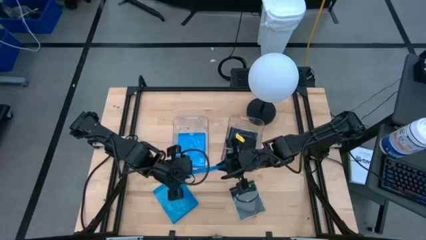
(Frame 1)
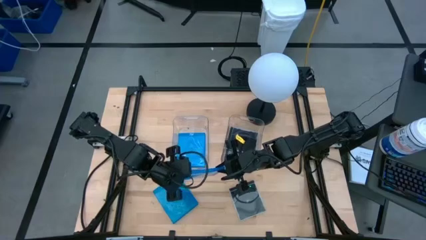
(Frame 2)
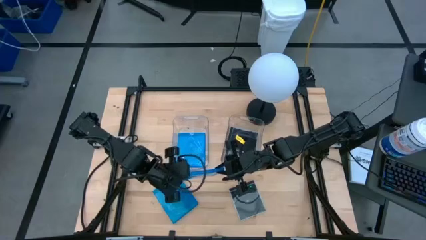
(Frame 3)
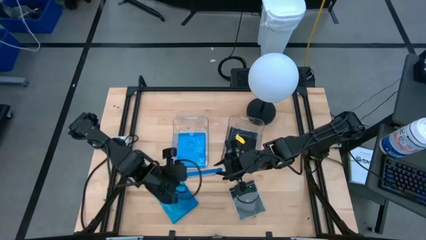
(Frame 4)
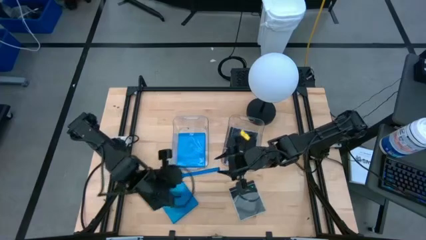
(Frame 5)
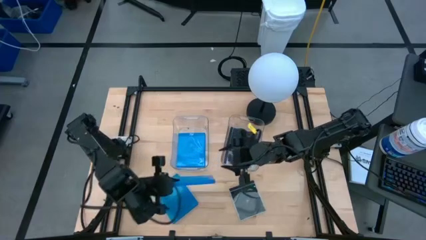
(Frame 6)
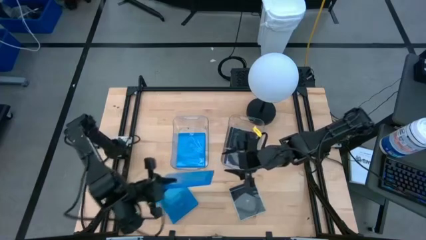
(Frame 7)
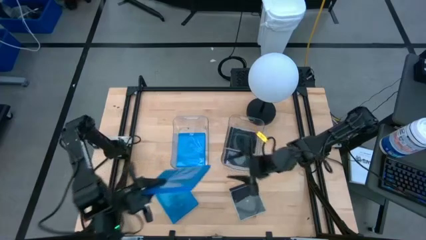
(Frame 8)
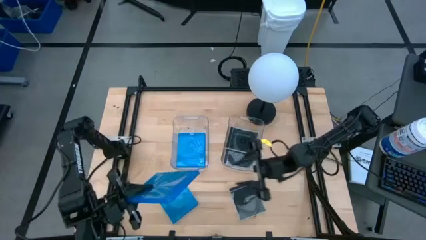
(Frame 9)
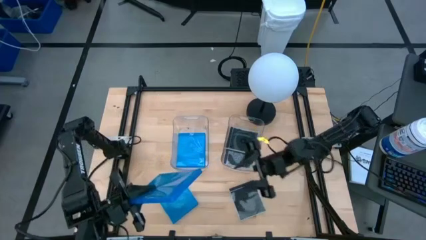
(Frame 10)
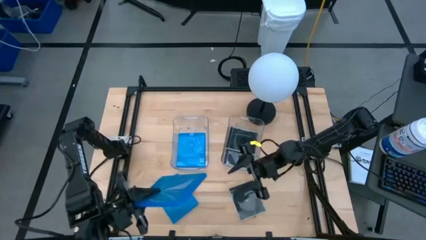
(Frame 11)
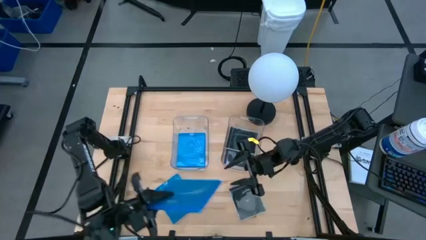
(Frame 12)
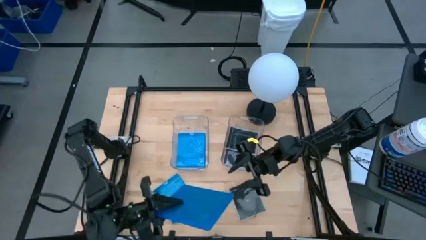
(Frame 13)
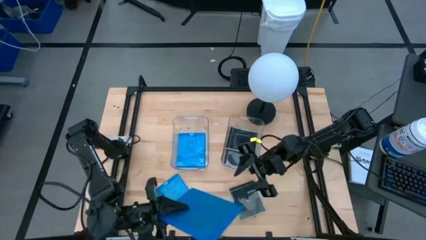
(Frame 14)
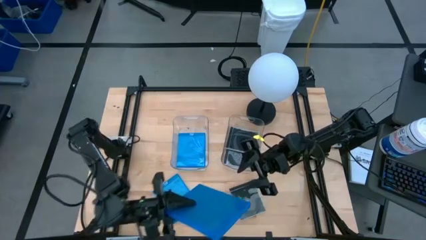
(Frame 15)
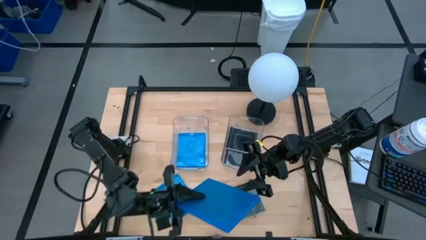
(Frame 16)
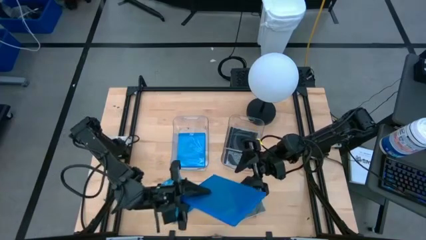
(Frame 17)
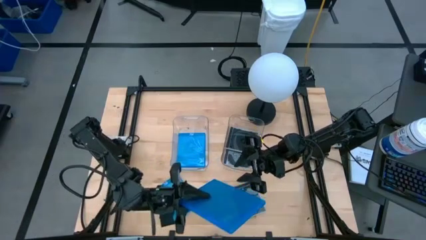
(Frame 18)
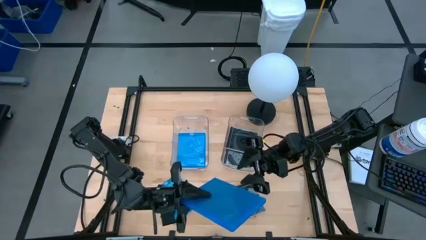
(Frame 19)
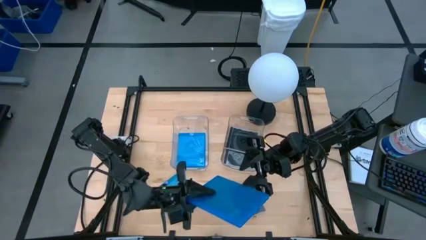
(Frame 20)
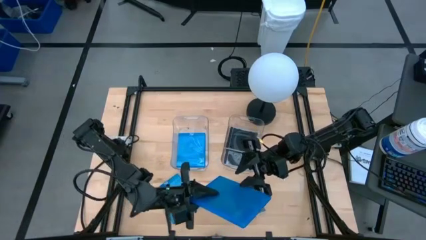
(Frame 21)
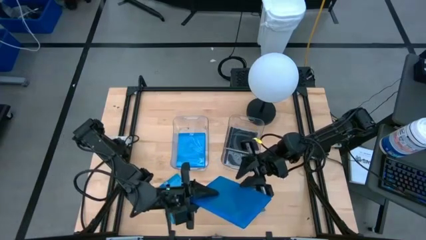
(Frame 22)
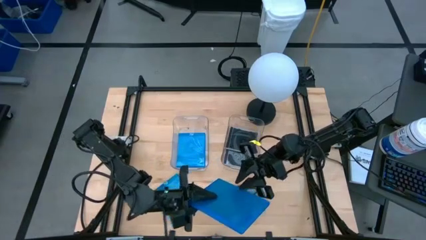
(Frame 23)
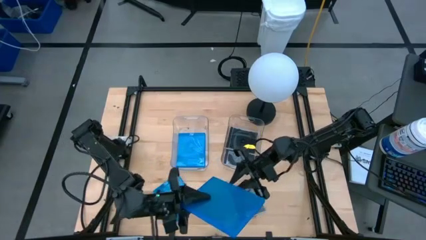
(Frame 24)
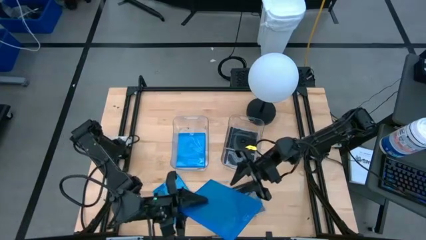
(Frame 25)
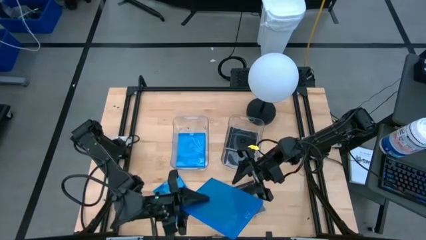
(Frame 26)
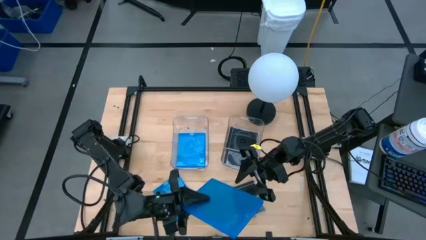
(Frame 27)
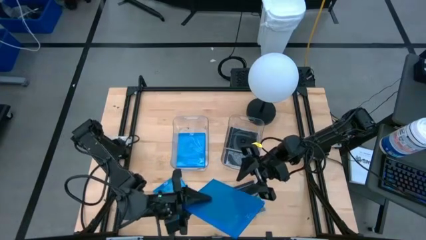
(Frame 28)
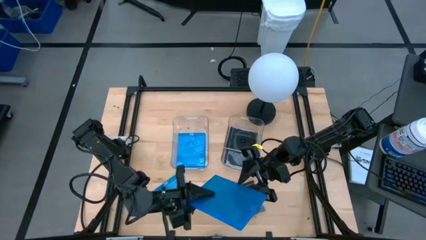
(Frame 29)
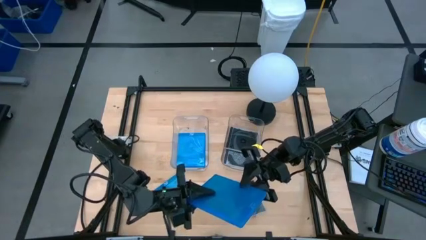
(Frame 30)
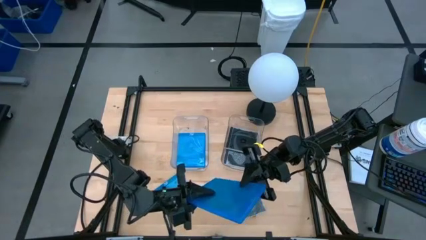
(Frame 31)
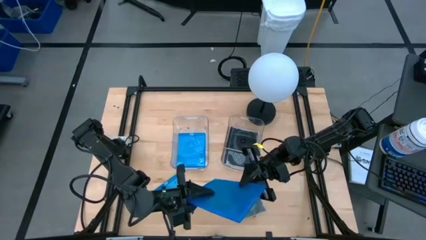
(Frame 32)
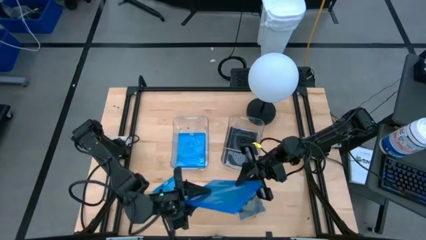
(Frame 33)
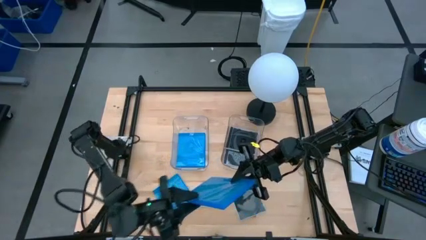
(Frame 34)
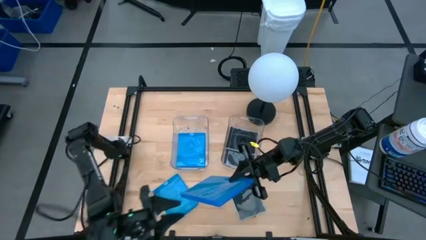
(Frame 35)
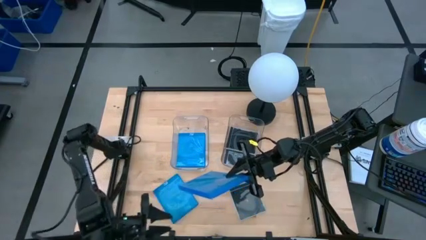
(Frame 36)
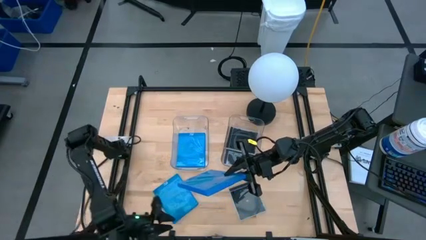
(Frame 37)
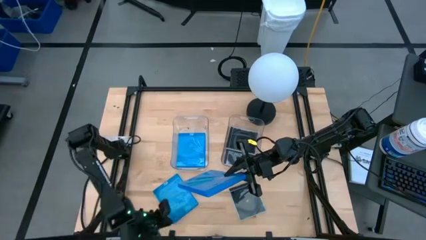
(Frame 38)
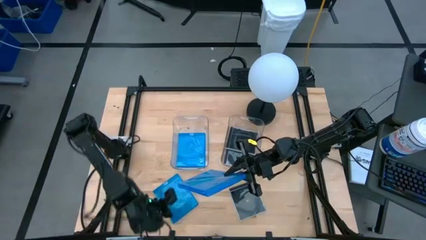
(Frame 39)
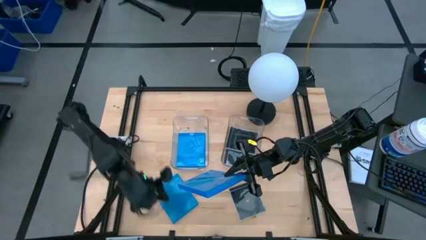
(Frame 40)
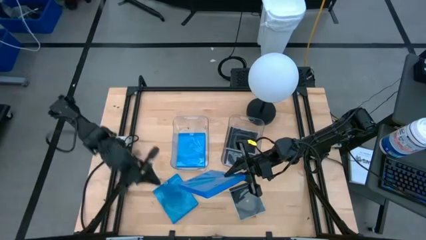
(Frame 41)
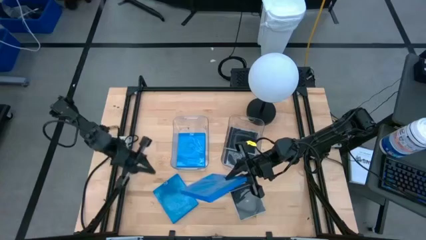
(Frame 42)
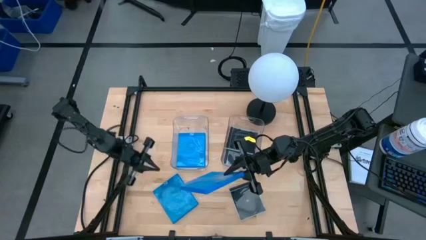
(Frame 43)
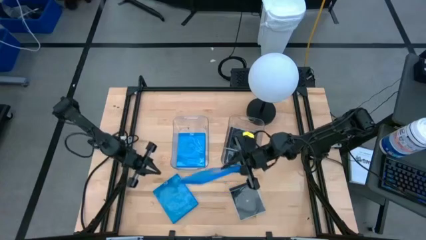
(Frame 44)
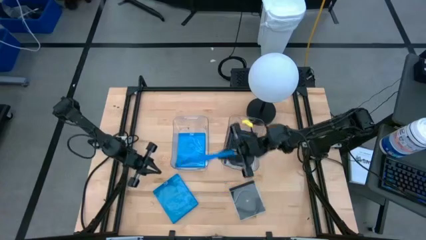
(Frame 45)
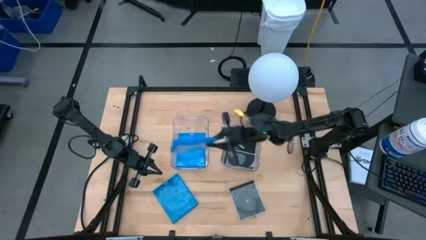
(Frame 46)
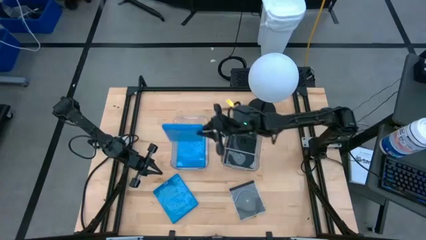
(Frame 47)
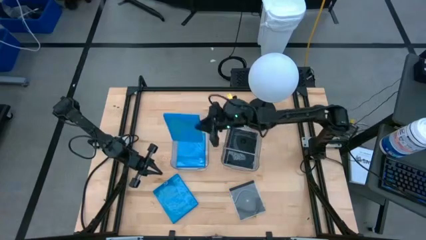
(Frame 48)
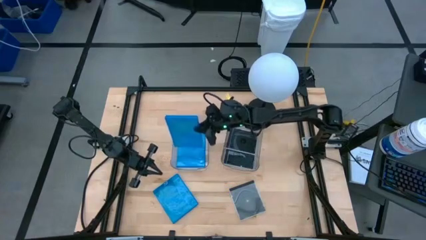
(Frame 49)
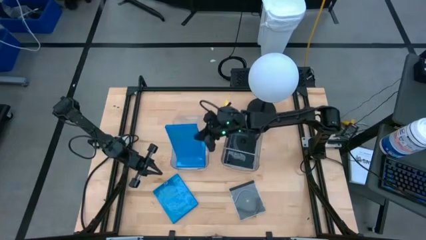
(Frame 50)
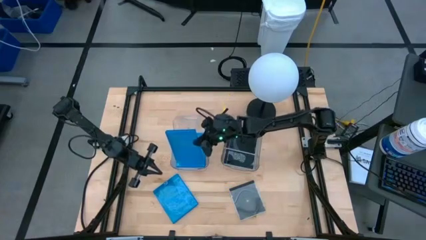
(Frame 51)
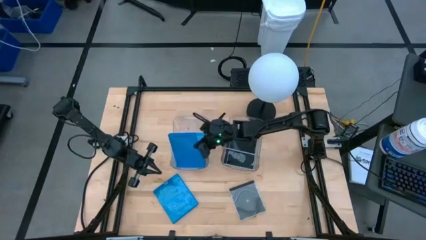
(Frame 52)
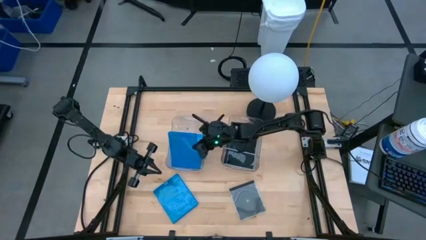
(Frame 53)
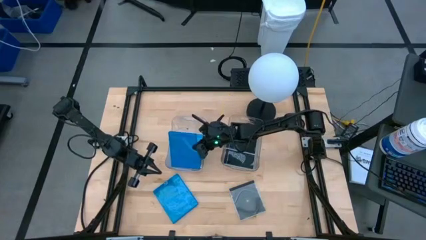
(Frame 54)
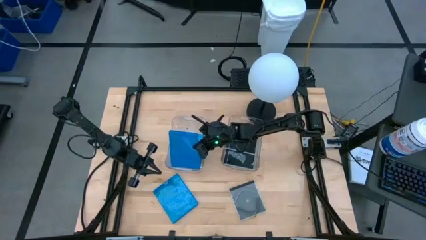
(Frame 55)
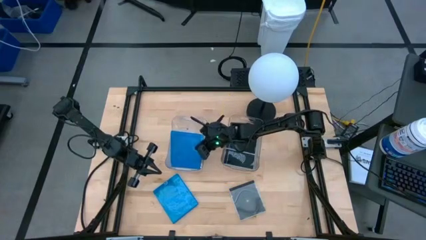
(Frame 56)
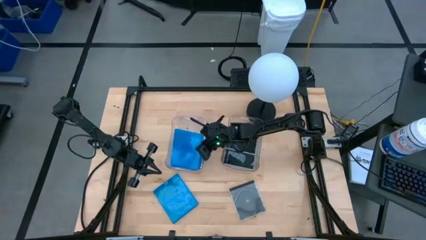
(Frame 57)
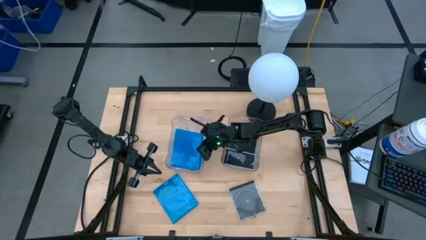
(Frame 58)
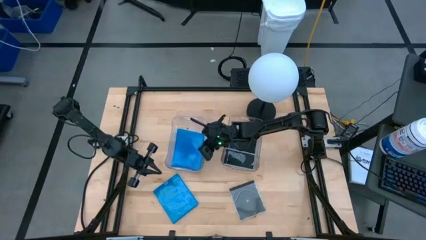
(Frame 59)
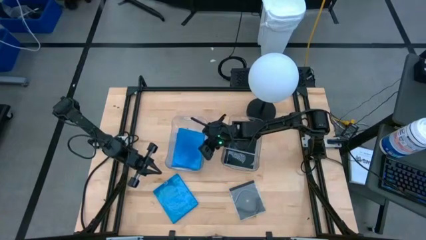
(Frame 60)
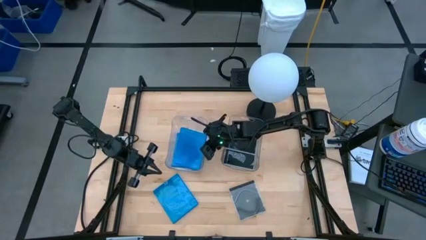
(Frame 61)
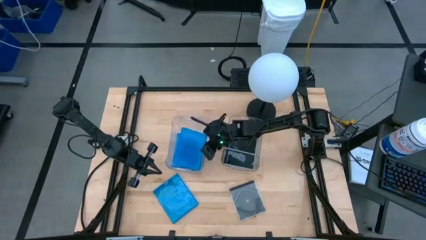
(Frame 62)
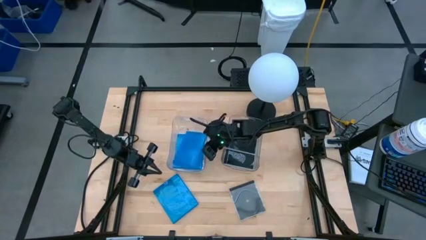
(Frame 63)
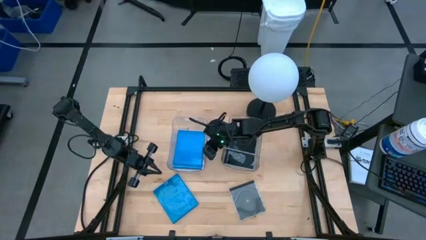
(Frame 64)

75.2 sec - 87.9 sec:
Task: Pick & place jewel cases by type
Put the blue CD case into the left transparent bin

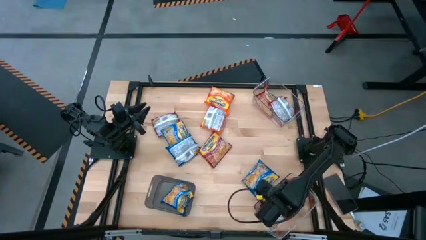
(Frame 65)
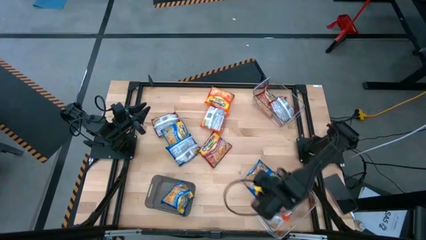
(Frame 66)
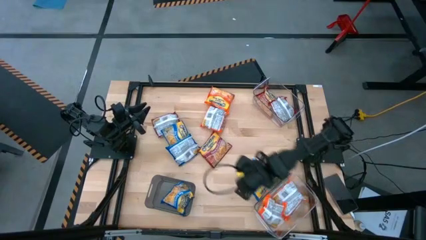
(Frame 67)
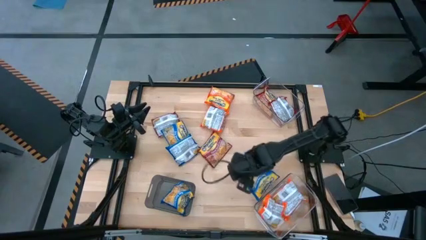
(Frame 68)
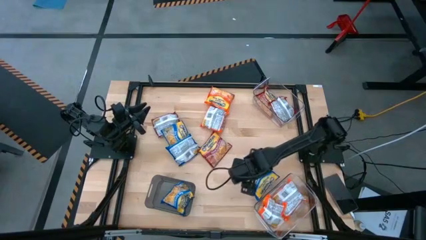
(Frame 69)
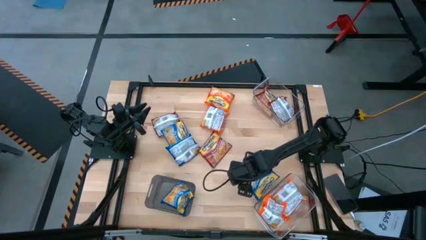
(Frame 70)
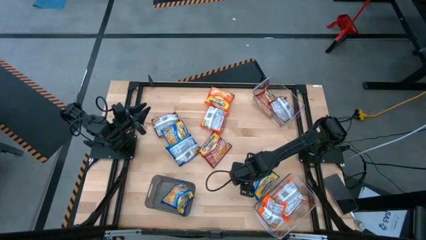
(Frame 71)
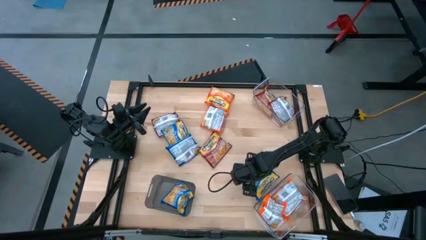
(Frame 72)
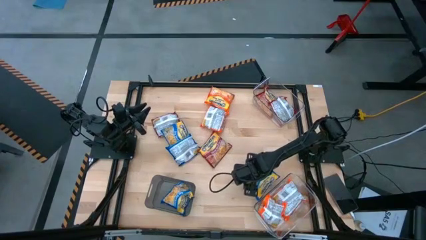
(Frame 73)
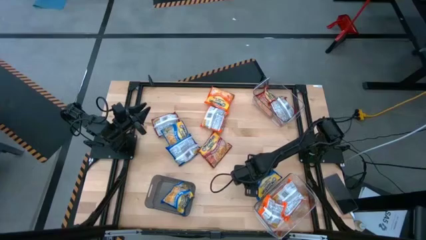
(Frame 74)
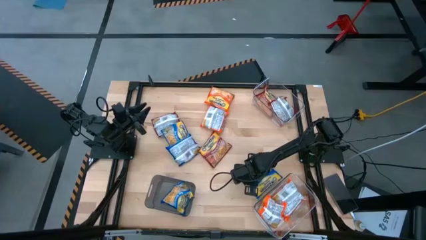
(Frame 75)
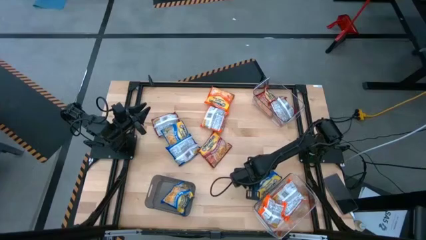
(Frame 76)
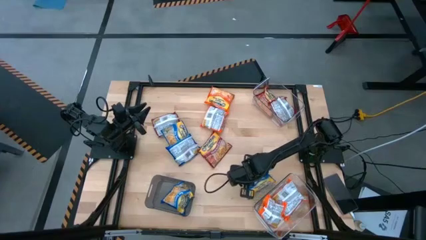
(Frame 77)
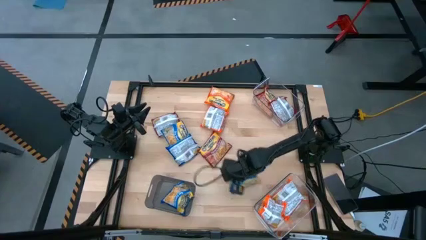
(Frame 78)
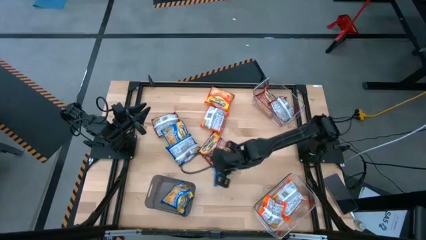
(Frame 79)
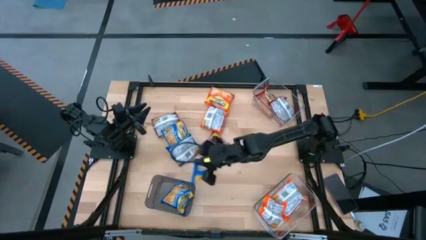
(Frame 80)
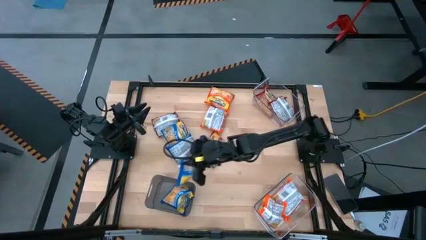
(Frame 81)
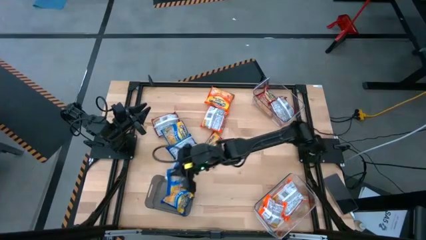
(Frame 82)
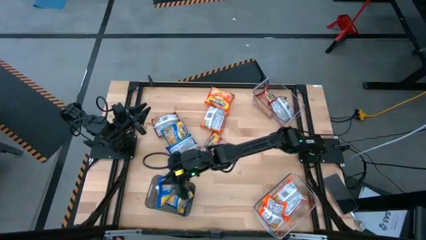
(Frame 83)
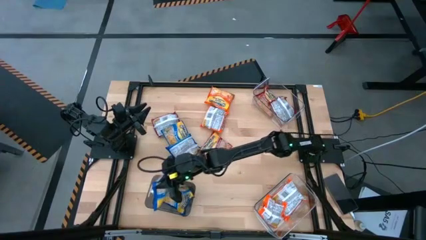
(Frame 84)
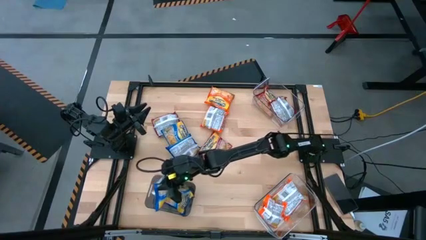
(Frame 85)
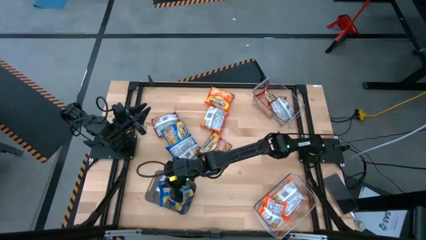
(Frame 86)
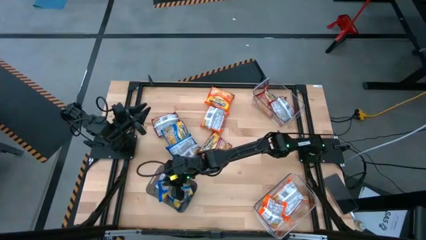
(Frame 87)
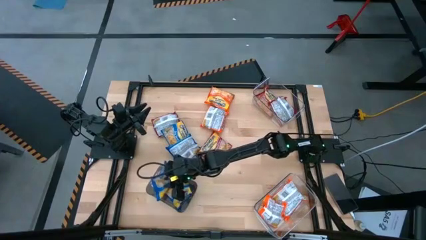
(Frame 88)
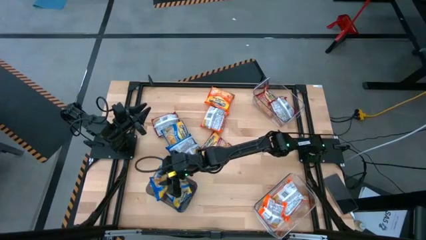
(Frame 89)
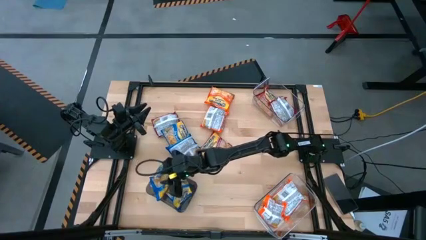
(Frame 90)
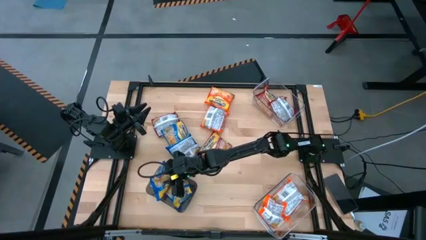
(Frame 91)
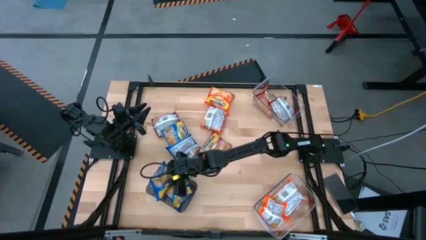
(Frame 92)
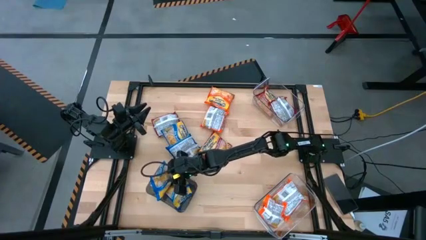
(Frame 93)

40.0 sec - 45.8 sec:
Task: Sort Maruchan noodles
Put the blue noodle pack into the black bin
